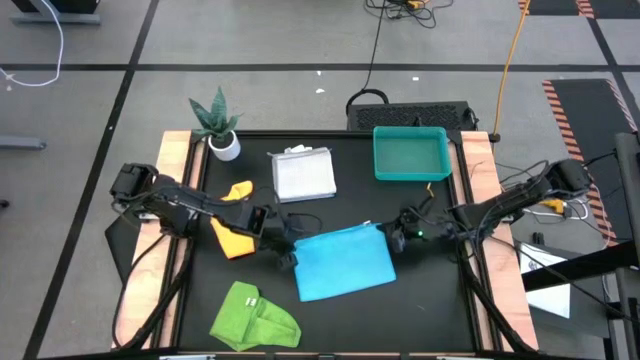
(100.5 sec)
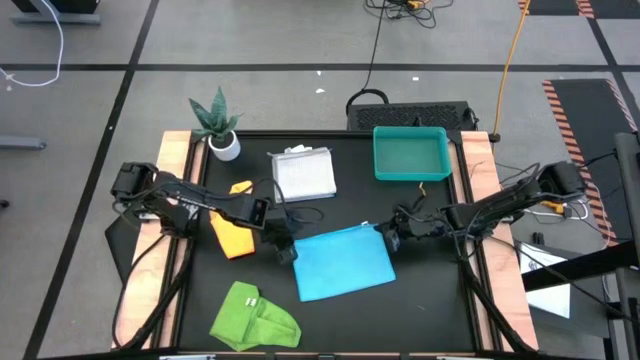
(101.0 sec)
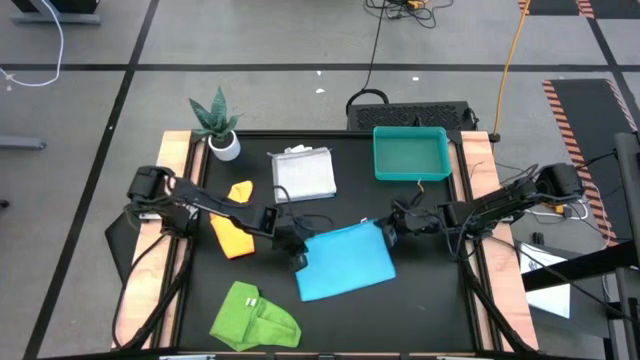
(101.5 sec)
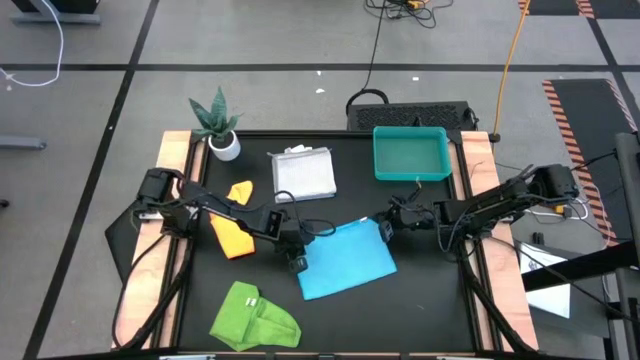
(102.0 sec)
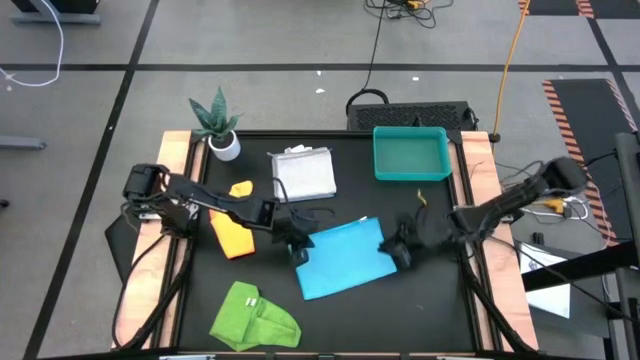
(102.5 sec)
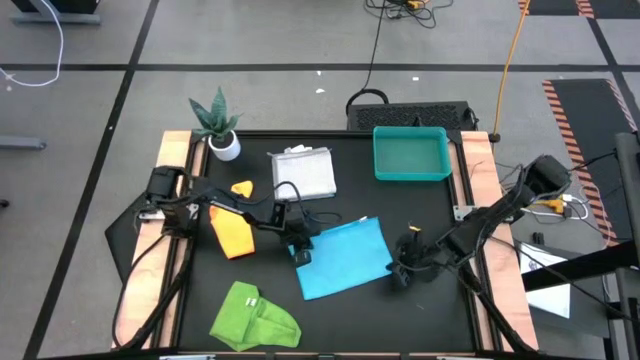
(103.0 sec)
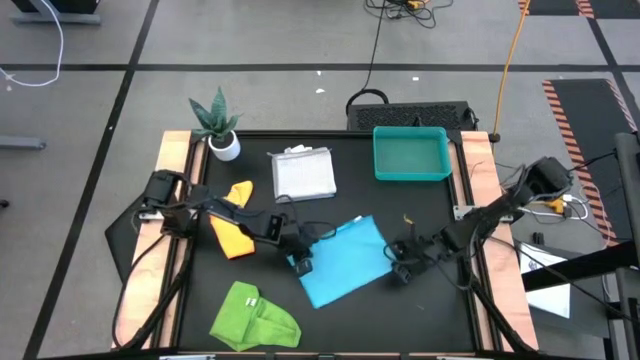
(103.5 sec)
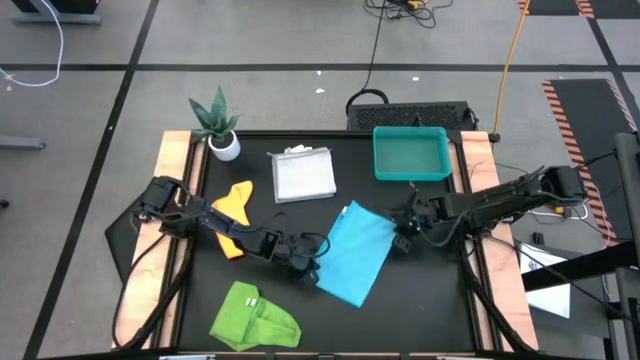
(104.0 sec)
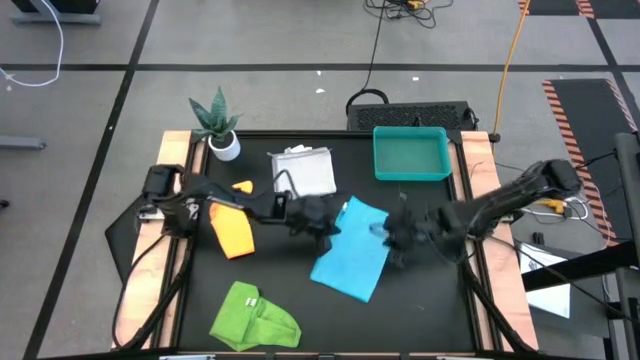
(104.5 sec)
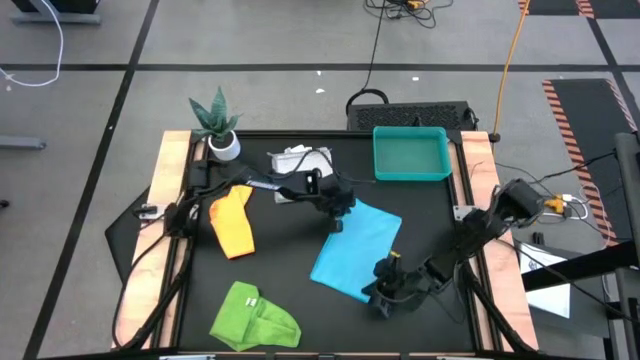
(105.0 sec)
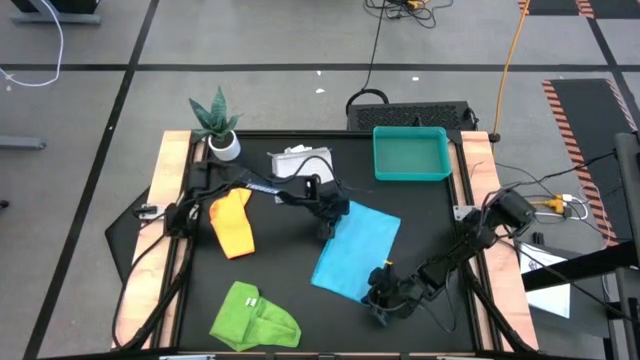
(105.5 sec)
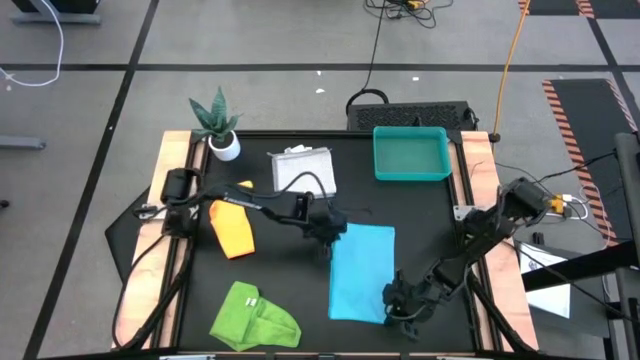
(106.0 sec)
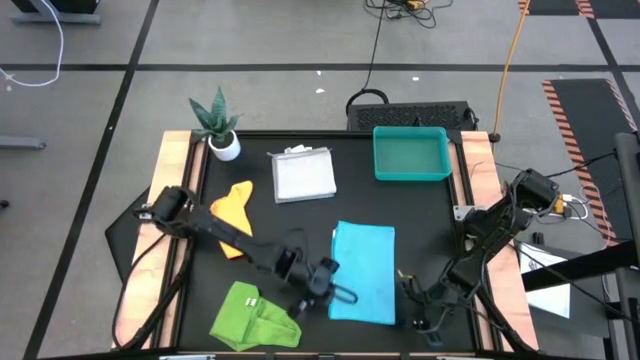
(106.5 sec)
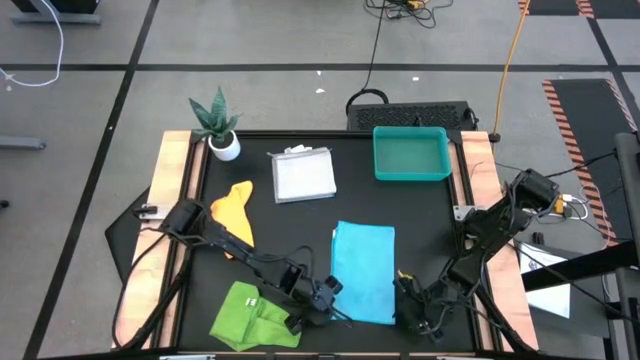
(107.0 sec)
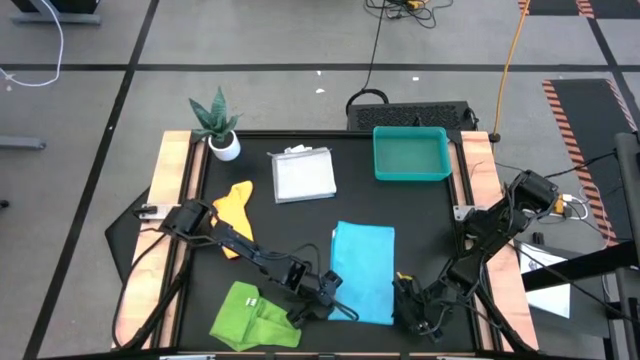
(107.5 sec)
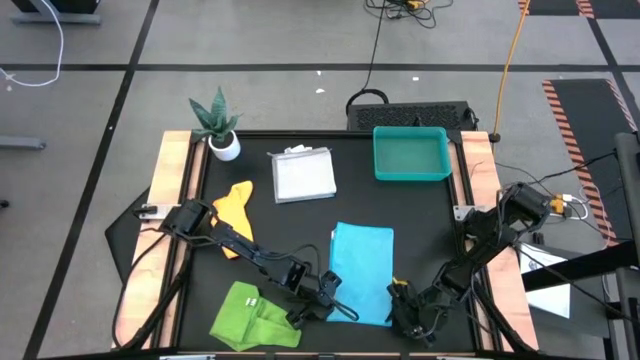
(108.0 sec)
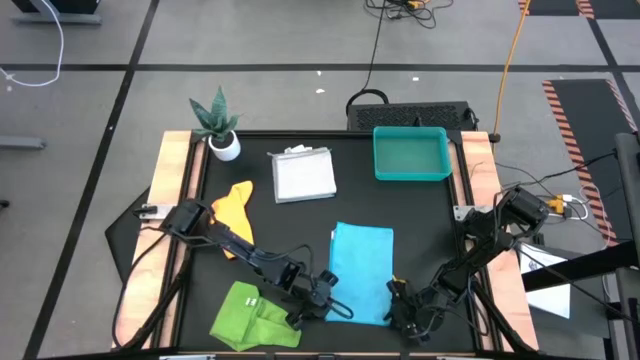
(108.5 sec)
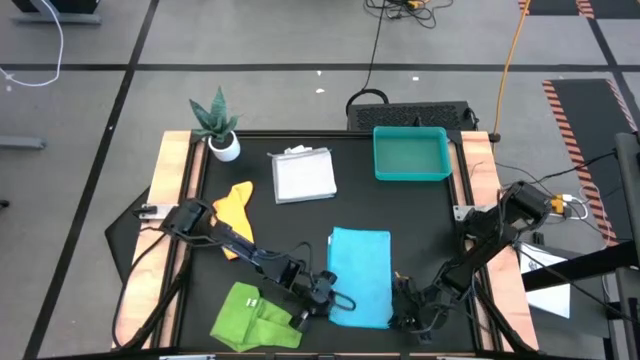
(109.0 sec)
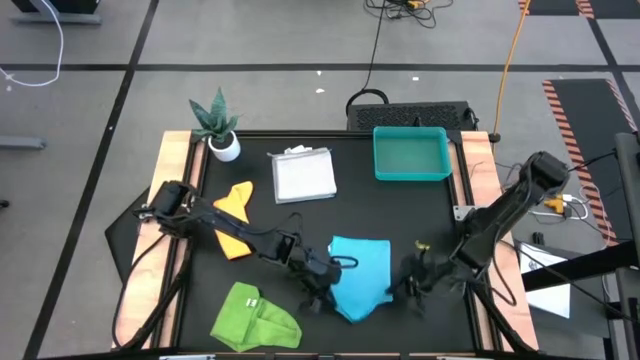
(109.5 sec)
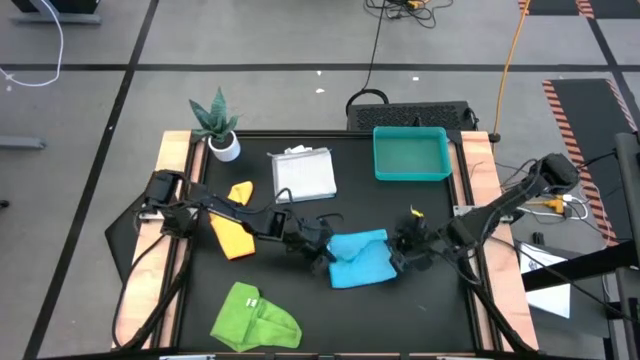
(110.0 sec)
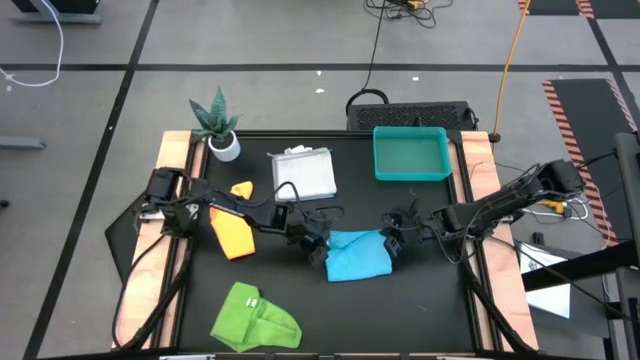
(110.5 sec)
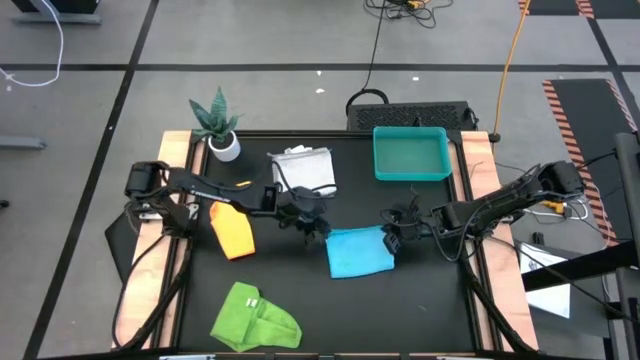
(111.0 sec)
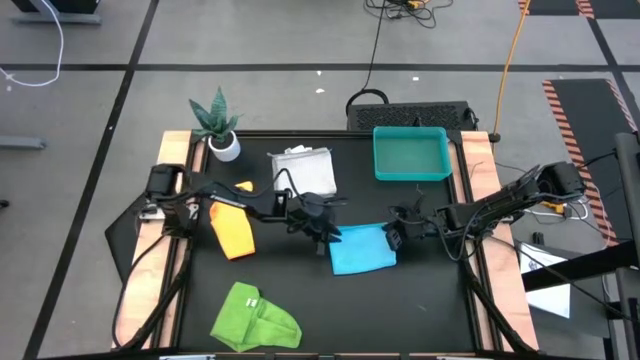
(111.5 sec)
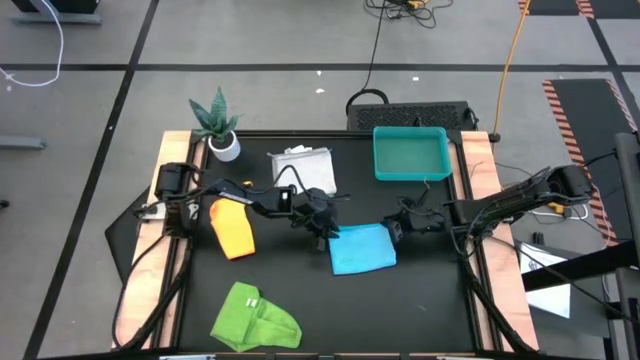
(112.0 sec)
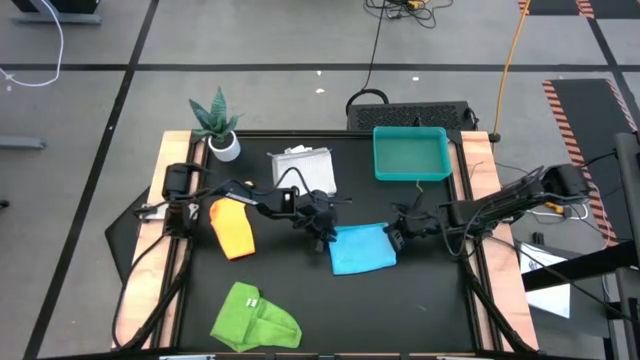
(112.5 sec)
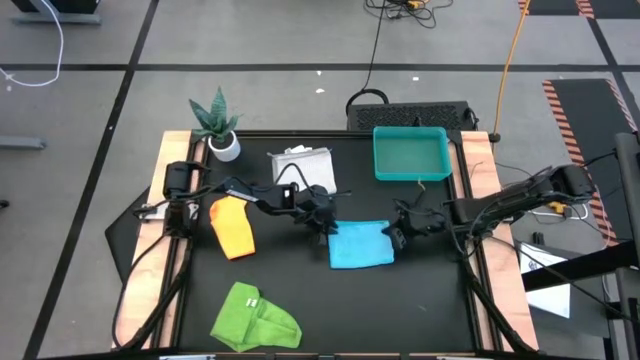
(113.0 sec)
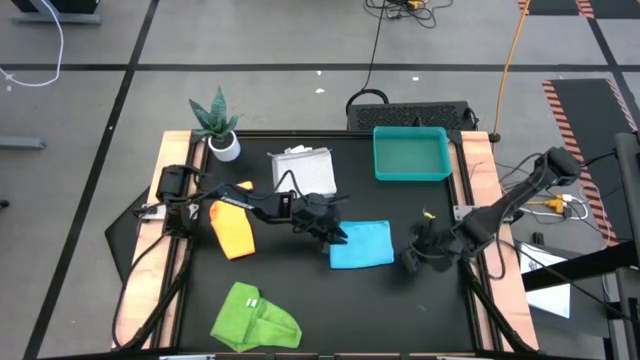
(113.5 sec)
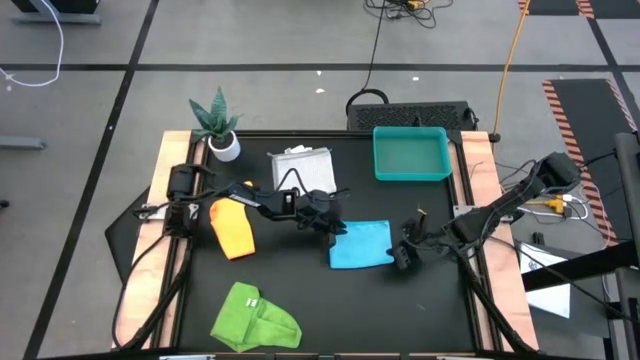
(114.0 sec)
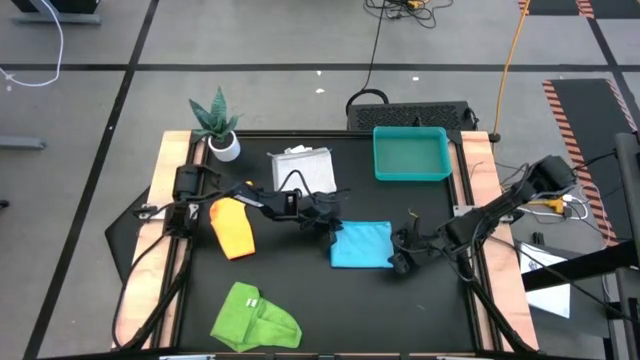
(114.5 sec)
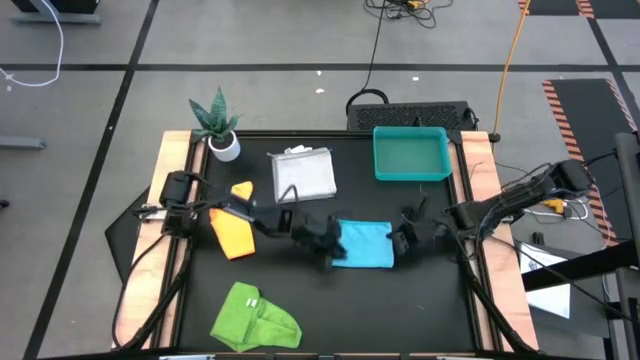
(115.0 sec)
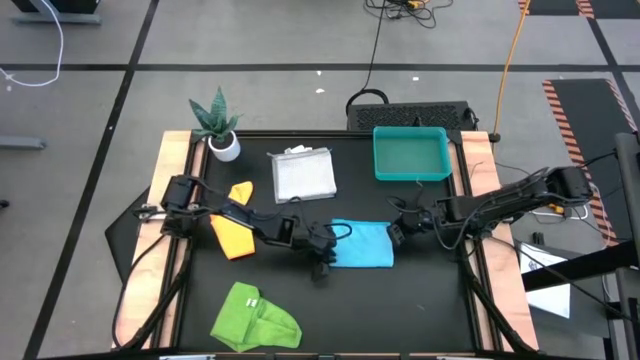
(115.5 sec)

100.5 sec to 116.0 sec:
Task: Fold microfiber towels
Fold the blue microfiber towel

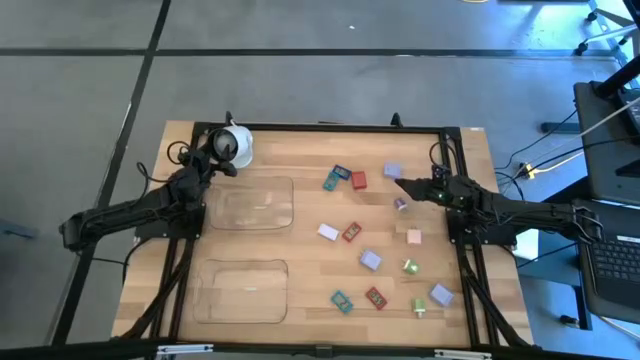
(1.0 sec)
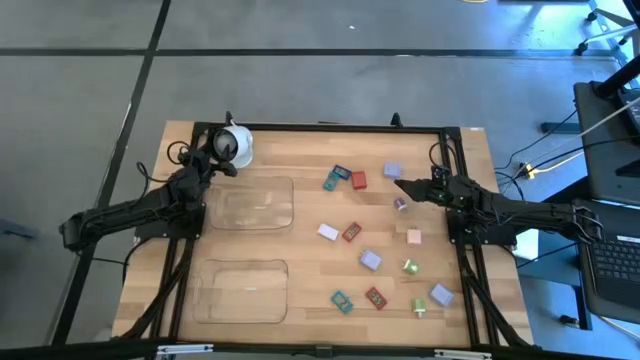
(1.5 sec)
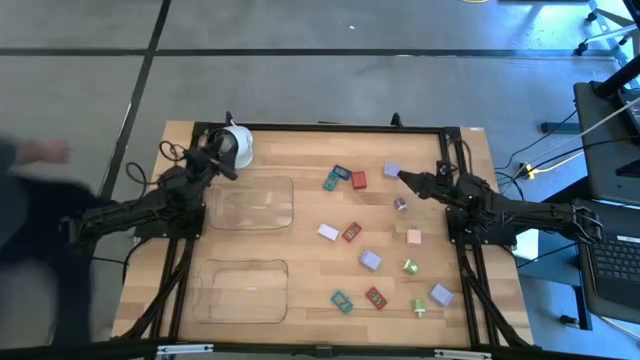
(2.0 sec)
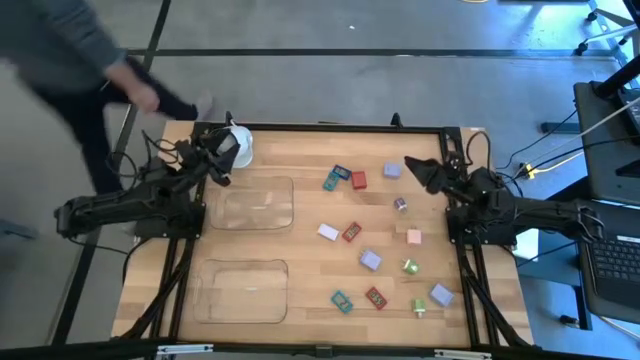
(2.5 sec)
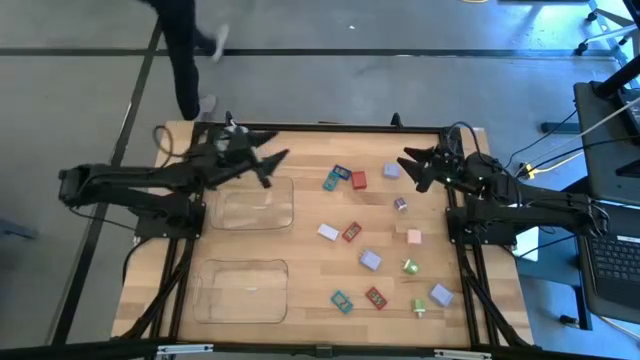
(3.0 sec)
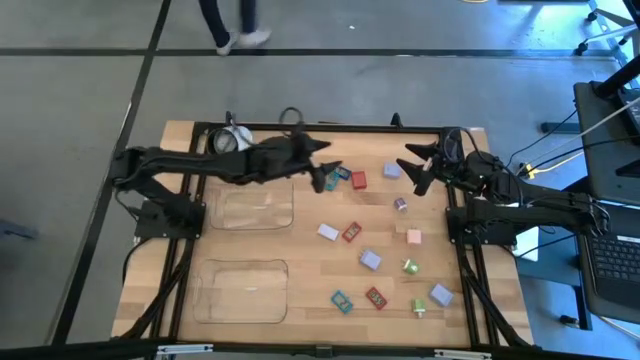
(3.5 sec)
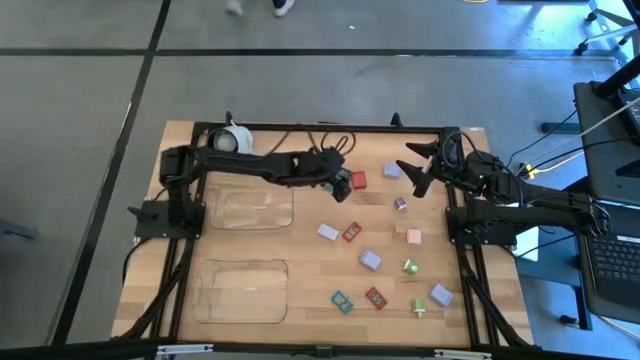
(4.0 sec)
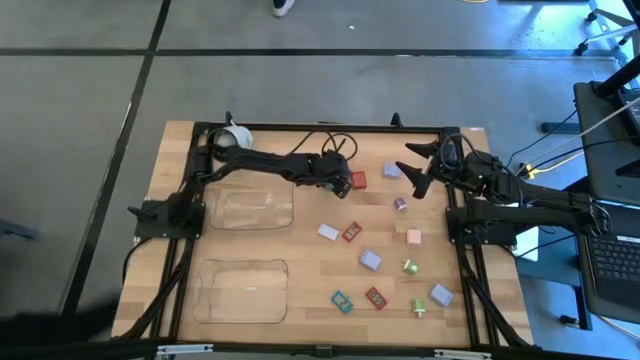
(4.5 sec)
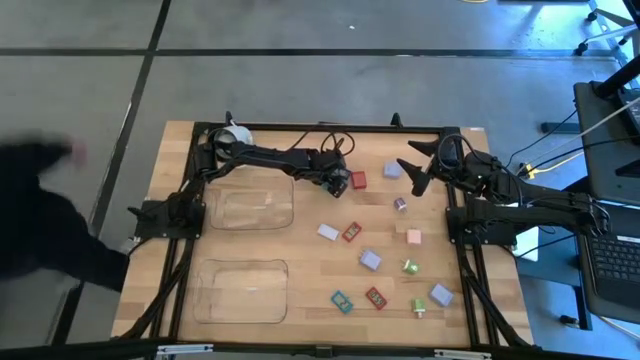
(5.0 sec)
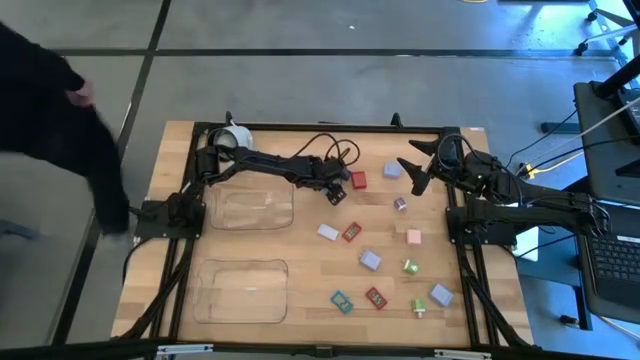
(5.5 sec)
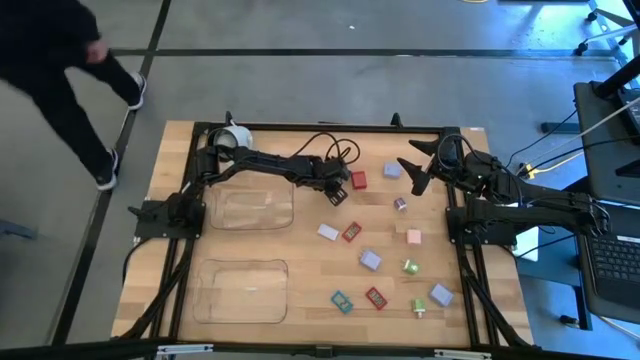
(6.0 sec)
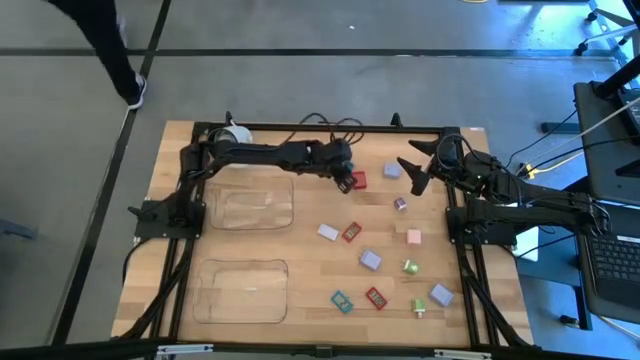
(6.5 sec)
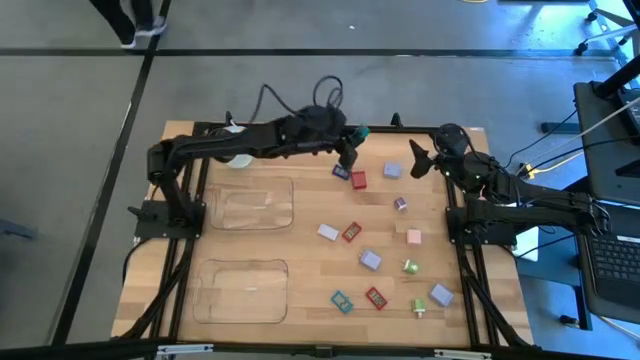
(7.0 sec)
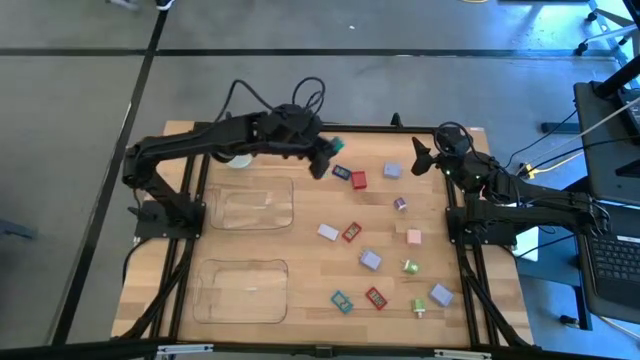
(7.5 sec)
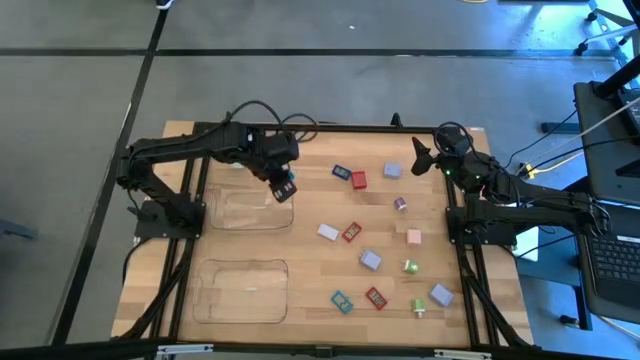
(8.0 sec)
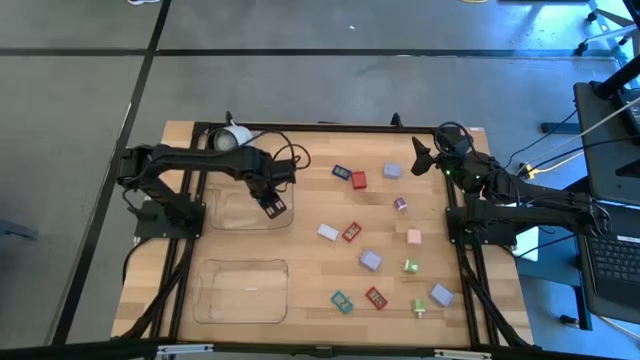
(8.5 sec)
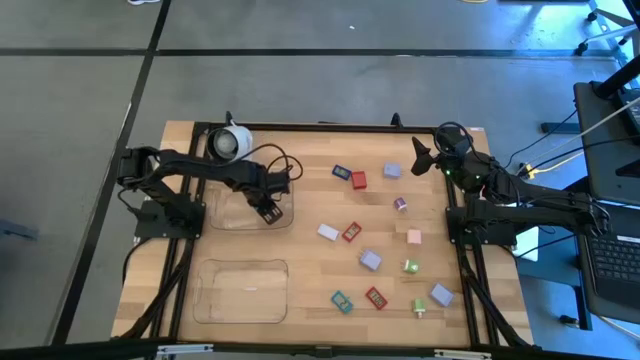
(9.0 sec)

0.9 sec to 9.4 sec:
Task: Pick & Place Office items
Put the top light blue timer into the top transparent bin
